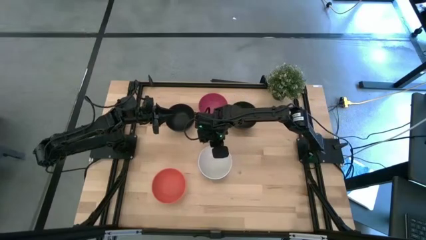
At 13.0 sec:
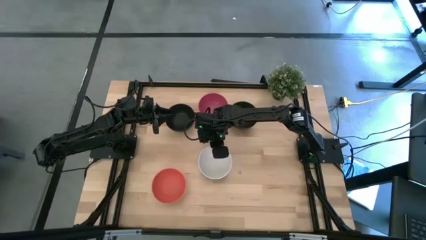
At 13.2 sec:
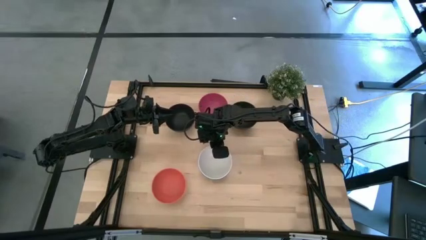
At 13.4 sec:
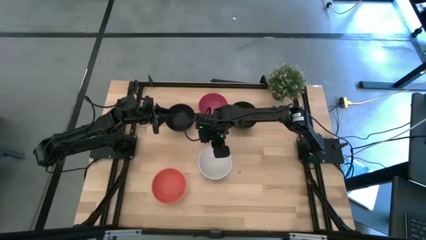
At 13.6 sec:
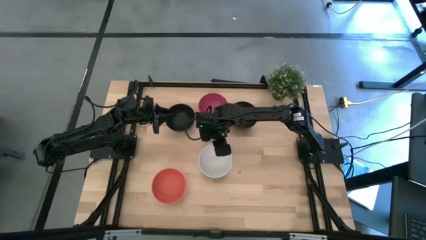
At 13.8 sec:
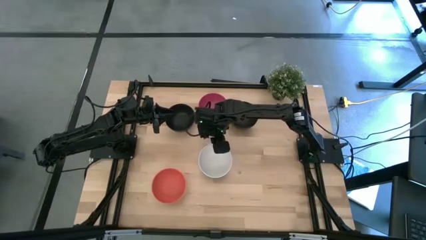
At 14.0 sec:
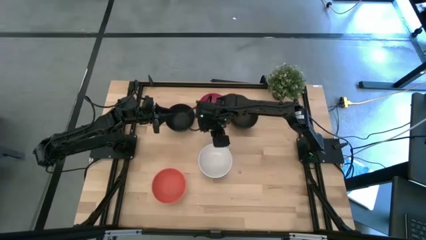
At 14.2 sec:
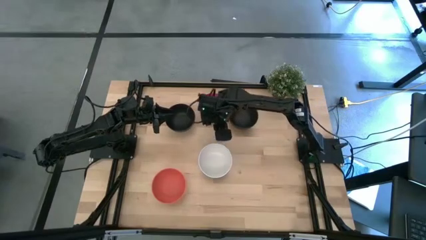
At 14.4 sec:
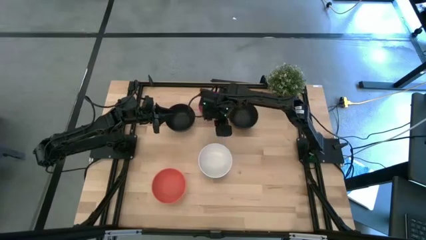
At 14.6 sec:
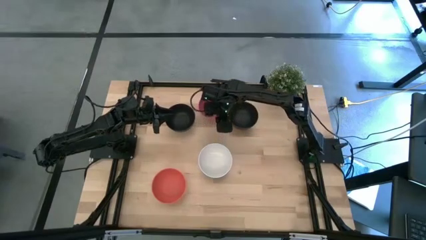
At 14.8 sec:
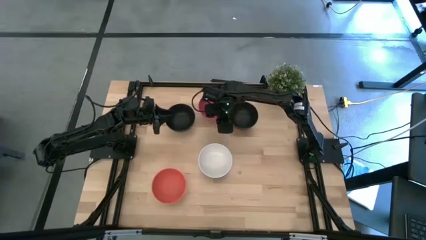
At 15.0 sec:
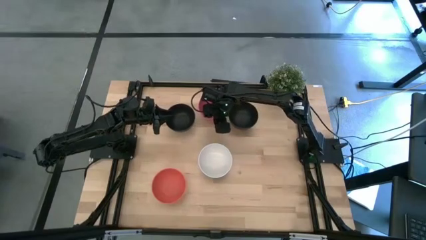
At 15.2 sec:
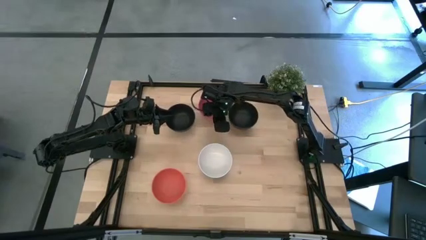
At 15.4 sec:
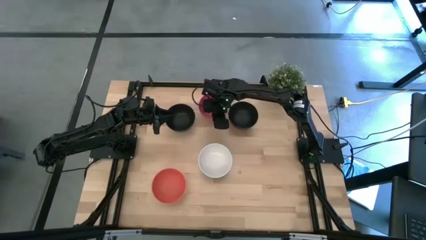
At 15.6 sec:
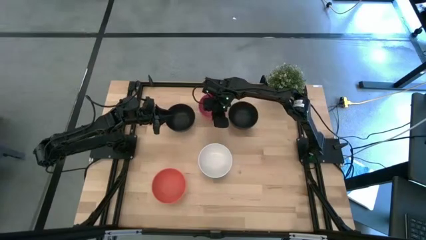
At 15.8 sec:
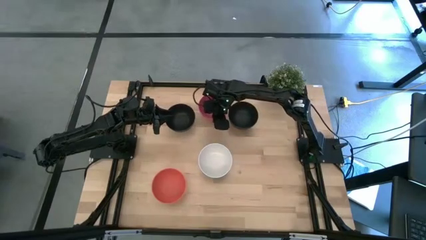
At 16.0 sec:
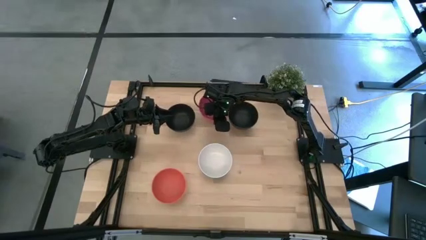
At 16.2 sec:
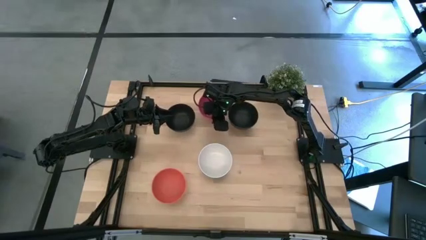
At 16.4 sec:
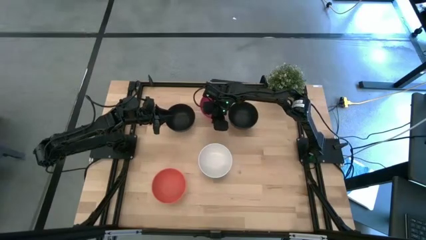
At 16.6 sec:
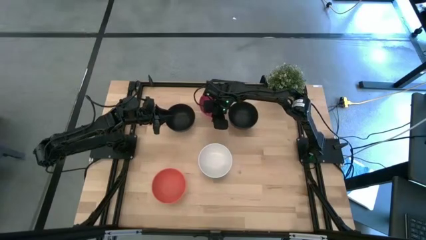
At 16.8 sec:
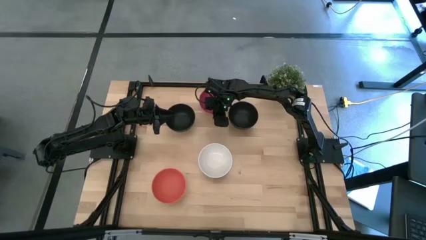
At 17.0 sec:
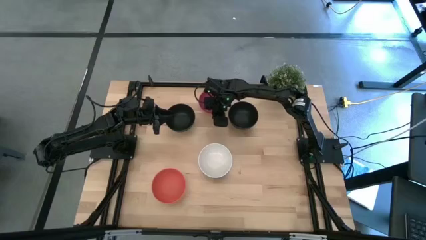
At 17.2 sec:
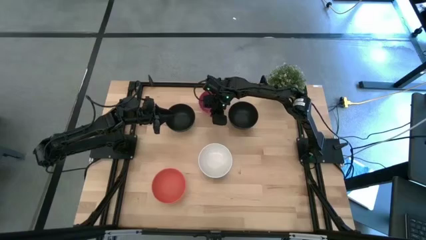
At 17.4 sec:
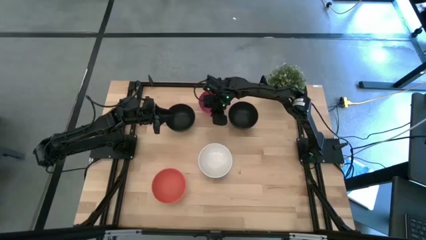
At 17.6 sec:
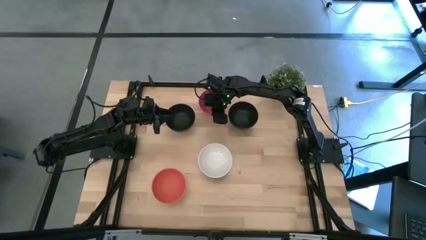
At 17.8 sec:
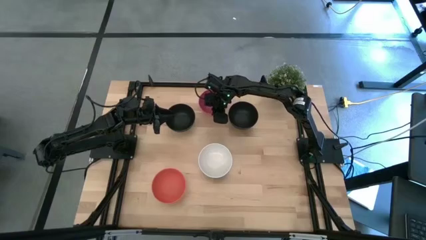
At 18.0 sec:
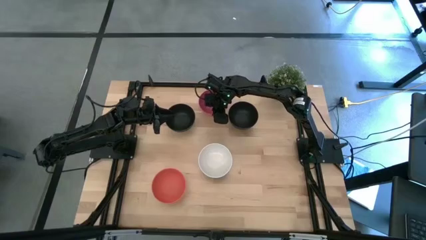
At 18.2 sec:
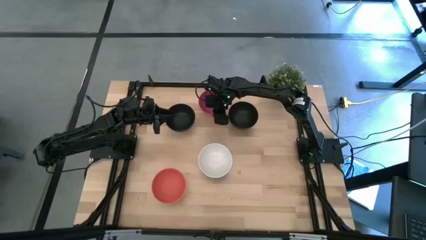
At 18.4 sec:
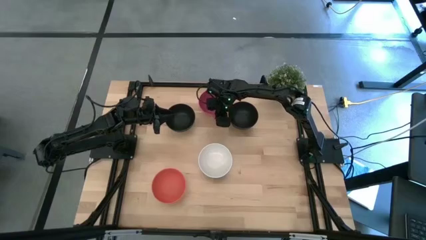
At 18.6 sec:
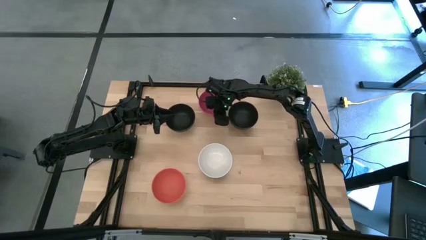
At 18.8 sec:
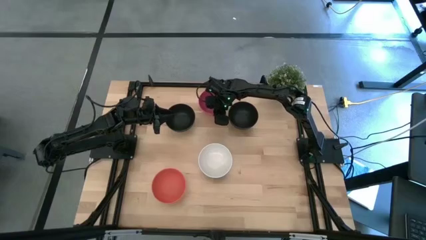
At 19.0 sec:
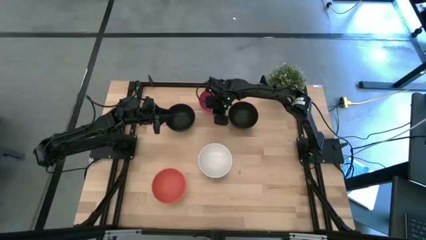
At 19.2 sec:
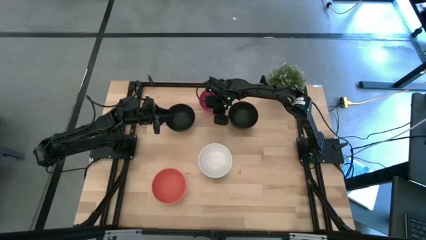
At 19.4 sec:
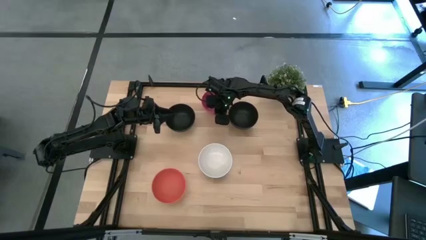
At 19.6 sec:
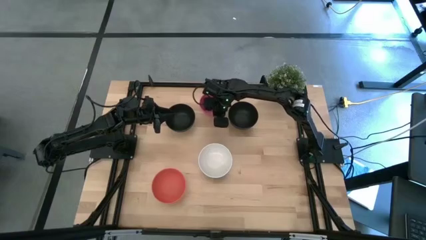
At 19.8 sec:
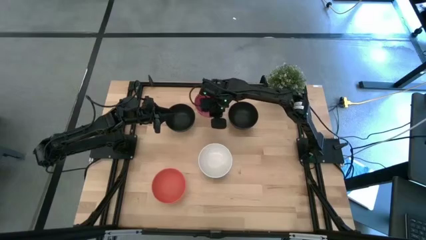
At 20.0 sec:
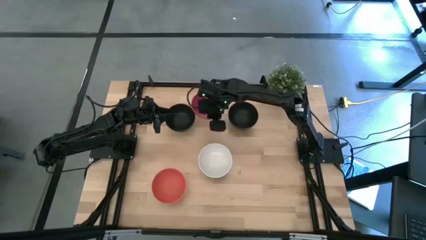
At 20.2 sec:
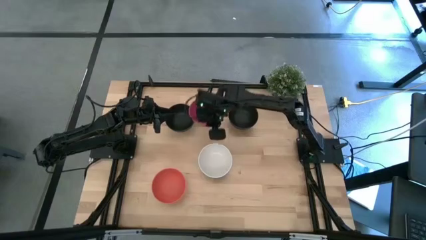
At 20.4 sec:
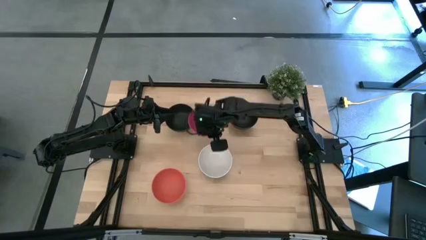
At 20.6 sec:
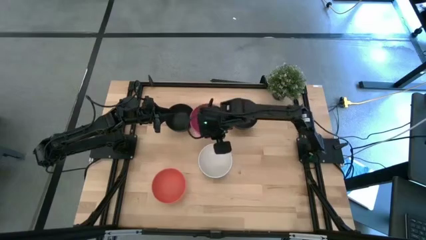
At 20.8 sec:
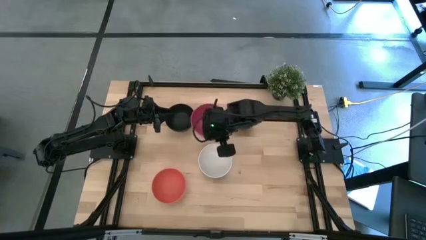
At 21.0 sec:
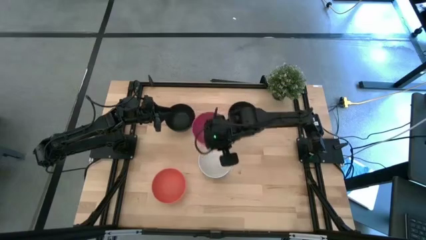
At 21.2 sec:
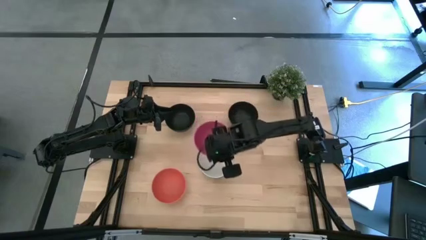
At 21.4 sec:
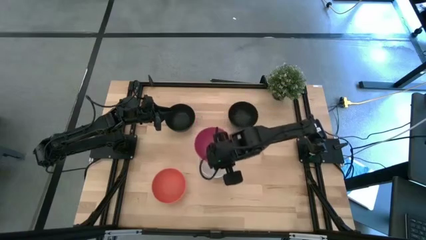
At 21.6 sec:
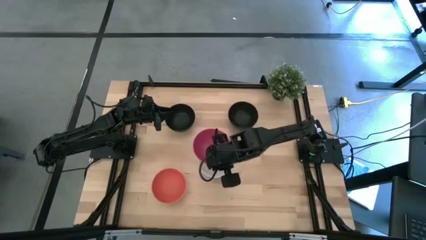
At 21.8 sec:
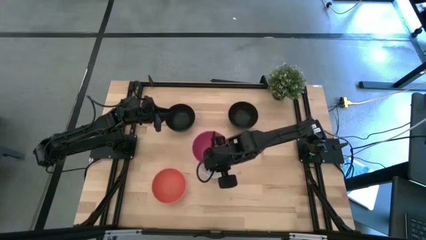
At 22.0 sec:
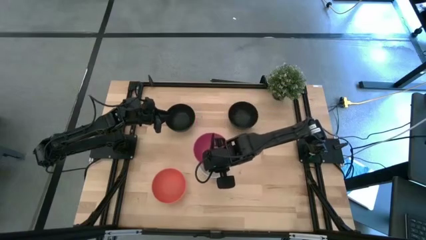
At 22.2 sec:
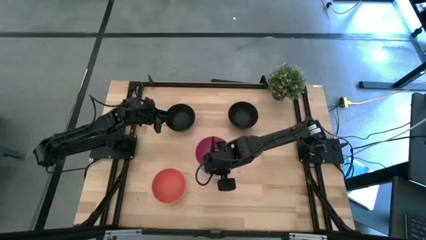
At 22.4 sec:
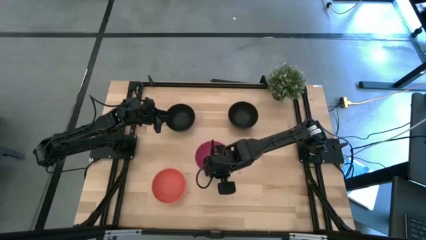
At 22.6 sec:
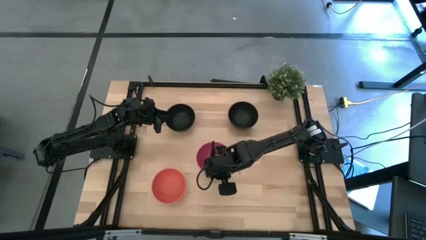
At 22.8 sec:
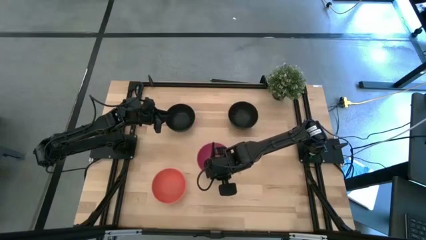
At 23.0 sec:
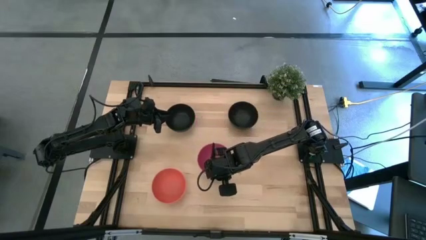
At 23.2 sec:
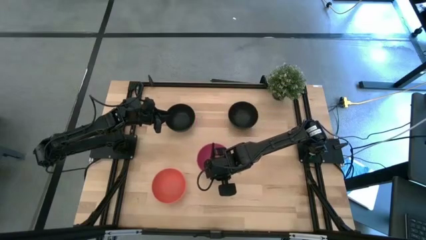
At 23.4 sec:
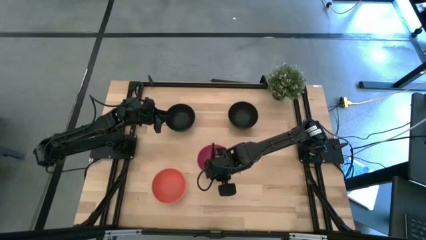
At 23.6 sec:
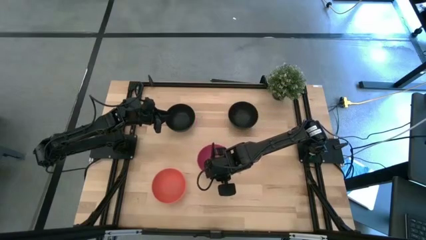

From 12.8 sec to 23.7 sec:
Task: Nest bowls inside each other
Stack the pink bowl on top of the white bowl

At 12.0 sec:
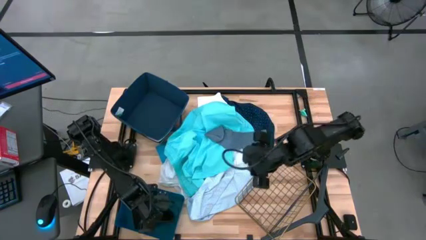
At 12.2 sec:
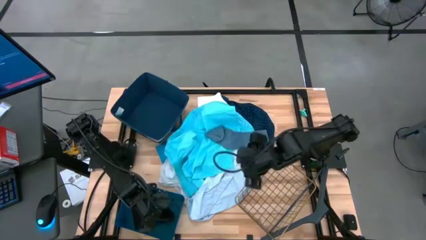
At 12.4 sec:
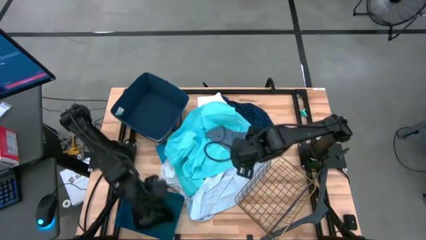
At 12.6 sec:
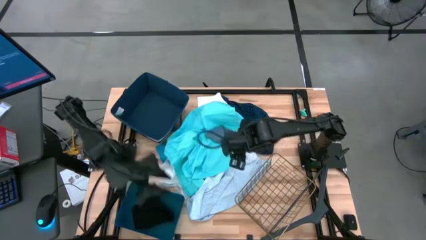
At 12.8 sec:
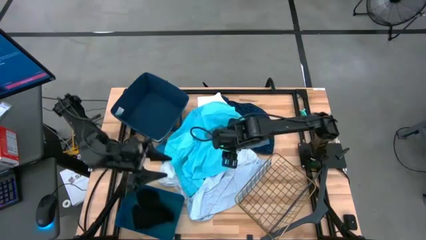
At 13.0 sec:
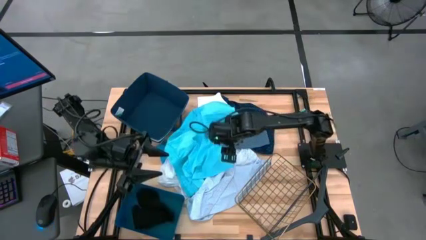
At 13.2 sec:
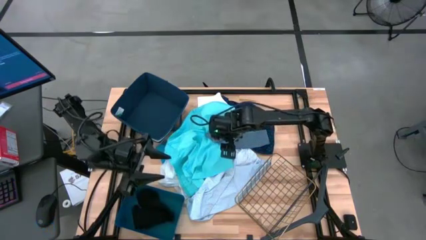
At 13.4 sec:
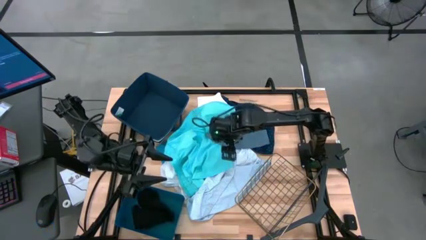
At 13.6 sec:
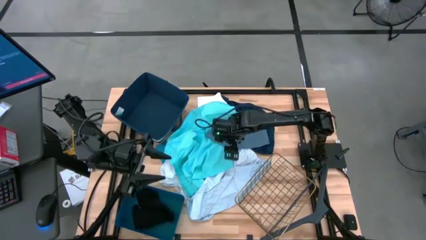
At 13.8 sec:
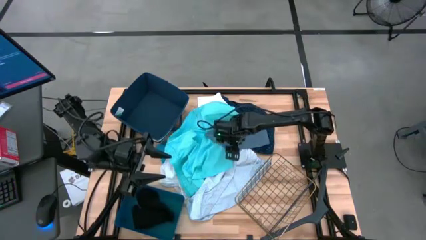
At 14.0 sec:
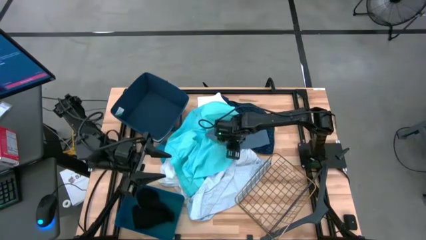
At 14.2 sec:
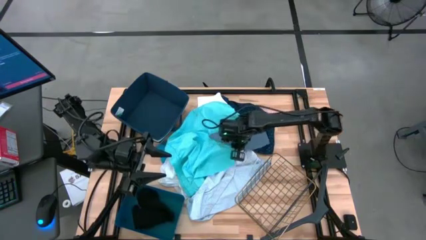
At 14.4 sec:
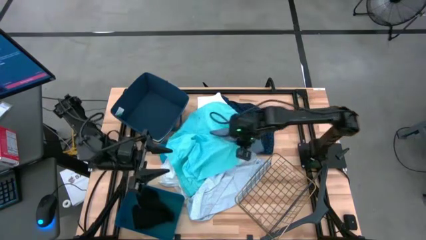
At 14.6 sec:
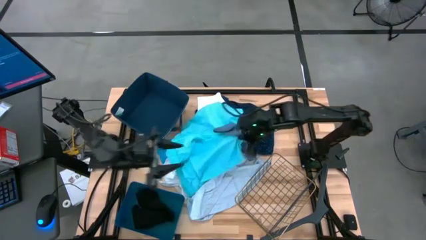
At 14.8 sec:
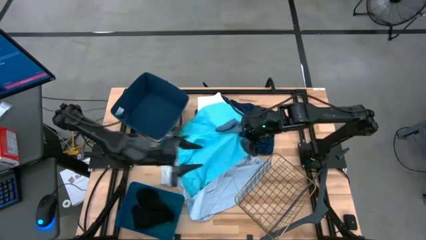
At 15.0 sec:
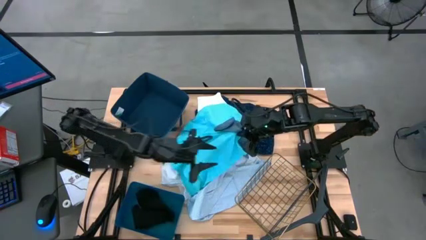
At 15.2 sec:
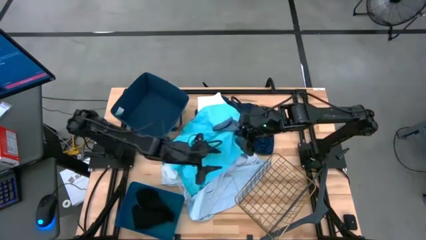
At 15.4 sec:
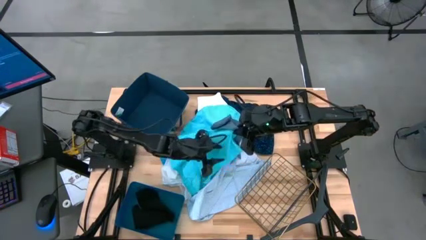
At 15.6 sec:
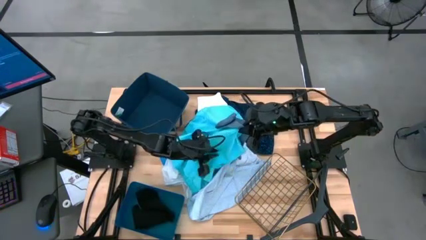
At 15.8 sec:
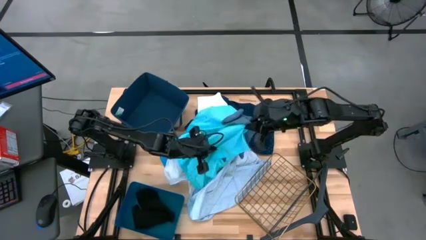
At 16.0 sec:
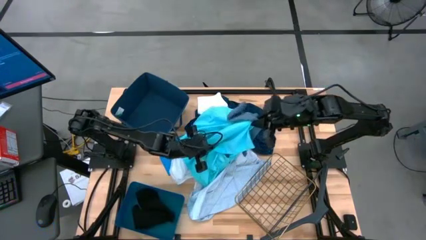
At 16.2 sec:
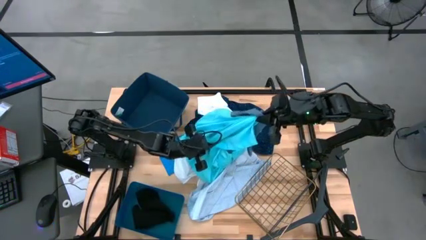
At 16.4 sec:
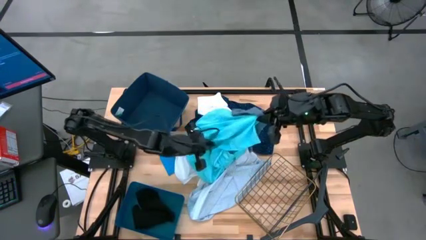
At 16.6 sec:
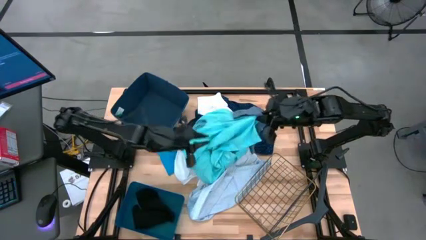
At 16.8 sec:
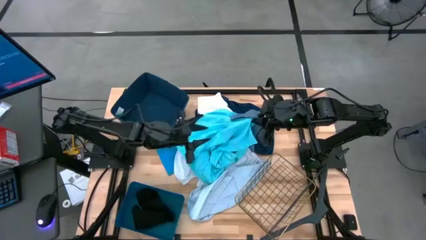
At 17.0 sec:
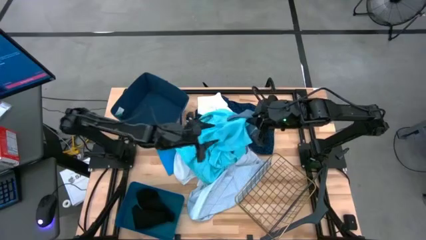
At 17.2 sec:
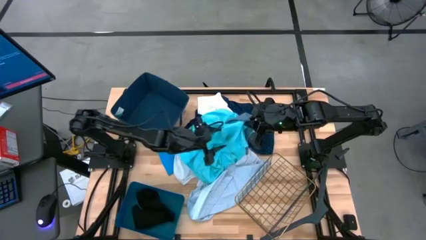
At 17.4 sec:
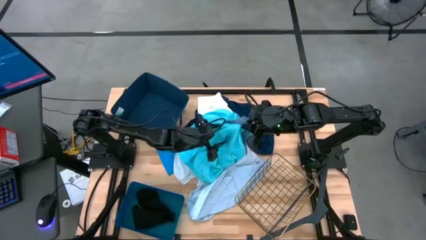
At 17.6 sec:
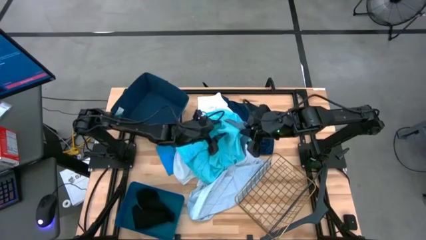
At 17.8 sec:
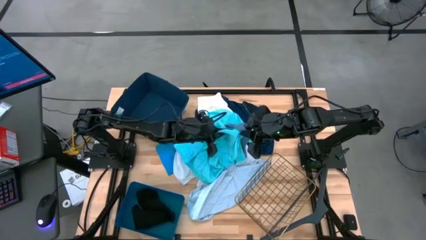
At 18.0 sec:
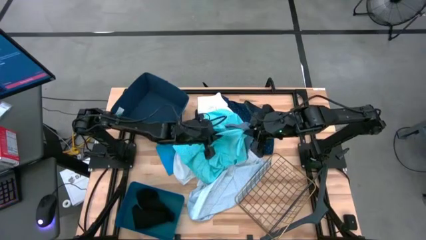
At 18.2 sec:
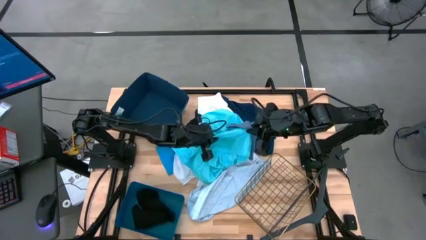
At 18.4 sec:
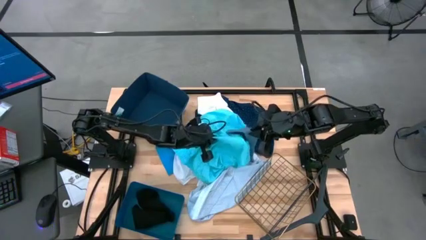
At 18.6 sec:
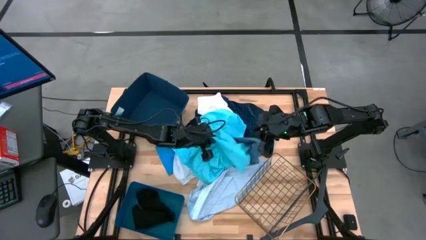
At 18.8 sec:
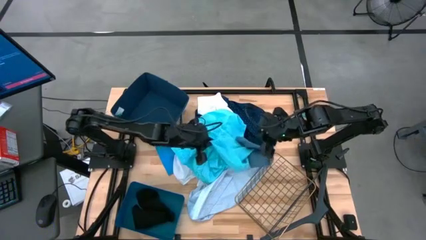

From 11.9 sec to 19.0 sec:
Task: Pick & Place Cloths
Put the gray sock into the blue bin
